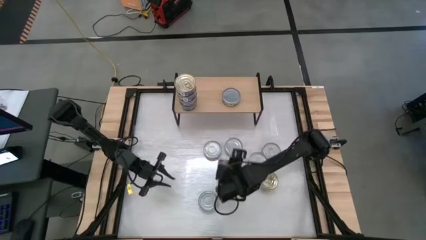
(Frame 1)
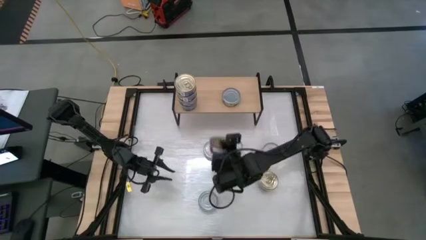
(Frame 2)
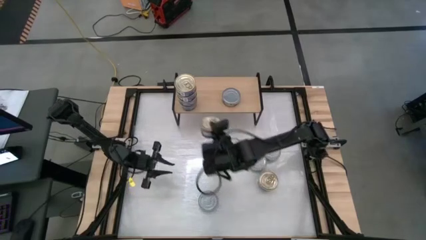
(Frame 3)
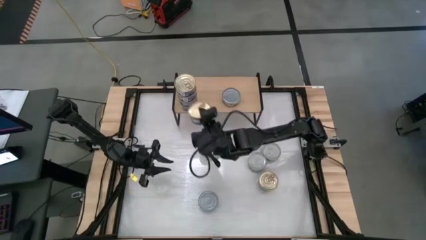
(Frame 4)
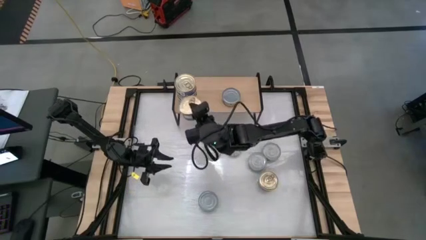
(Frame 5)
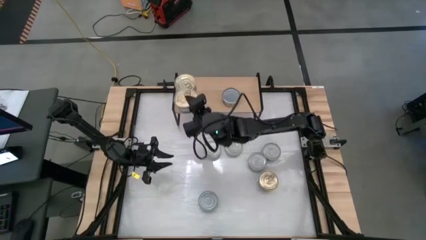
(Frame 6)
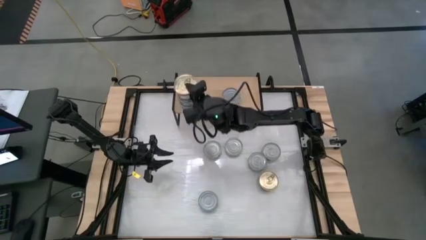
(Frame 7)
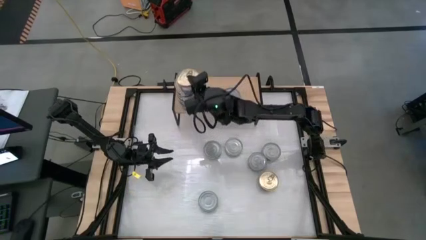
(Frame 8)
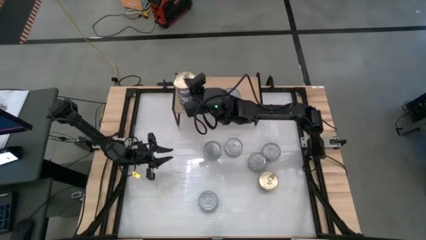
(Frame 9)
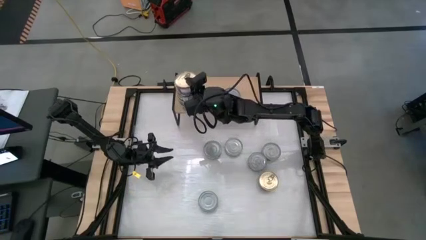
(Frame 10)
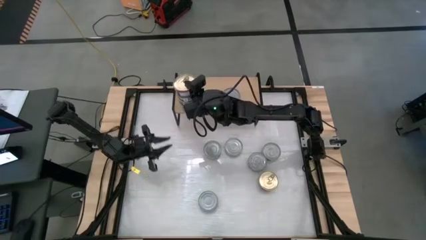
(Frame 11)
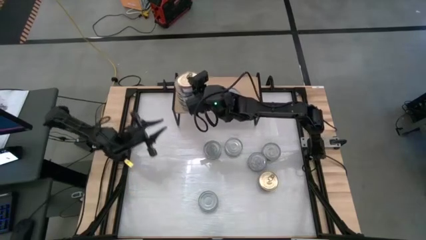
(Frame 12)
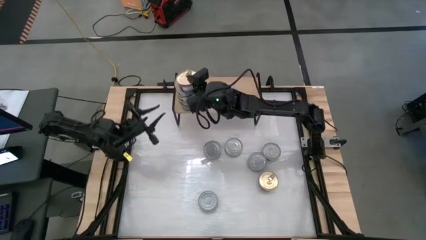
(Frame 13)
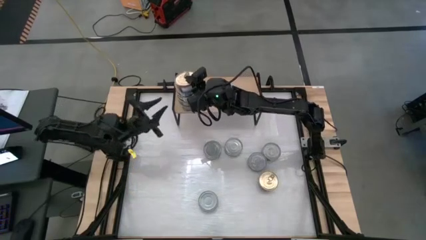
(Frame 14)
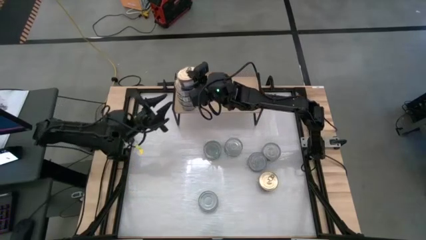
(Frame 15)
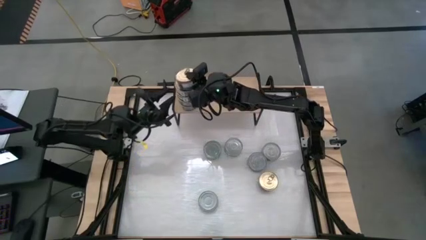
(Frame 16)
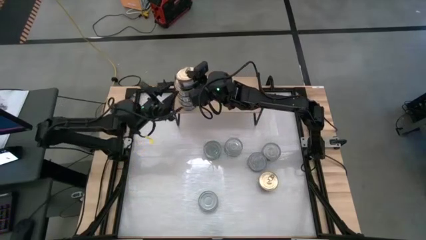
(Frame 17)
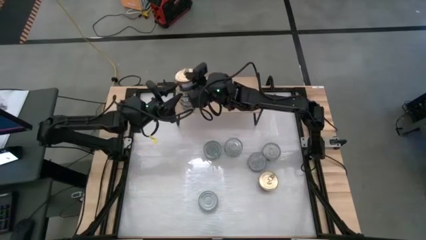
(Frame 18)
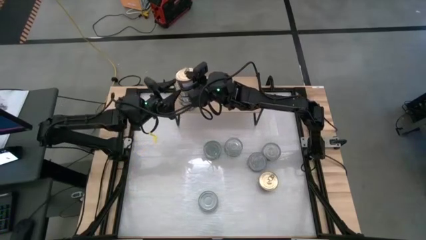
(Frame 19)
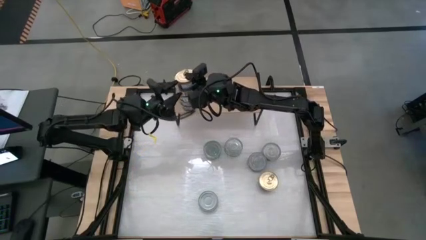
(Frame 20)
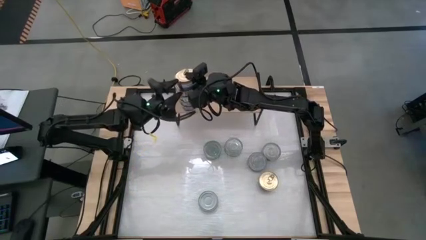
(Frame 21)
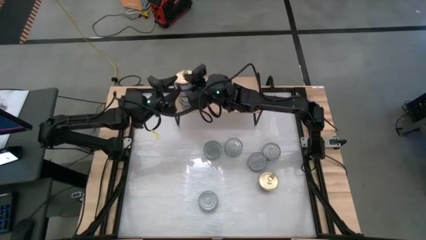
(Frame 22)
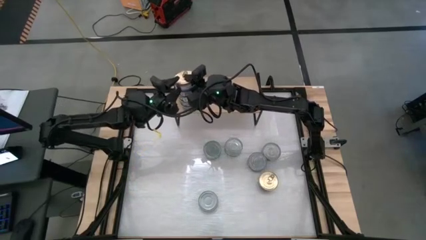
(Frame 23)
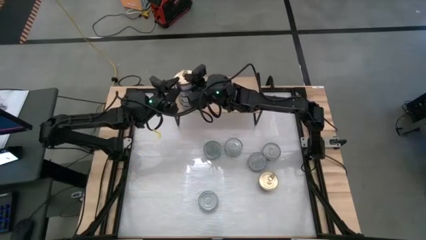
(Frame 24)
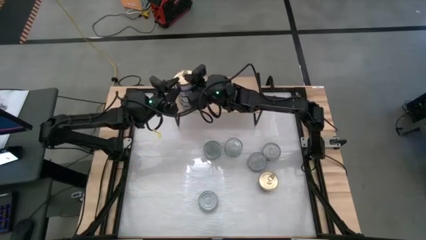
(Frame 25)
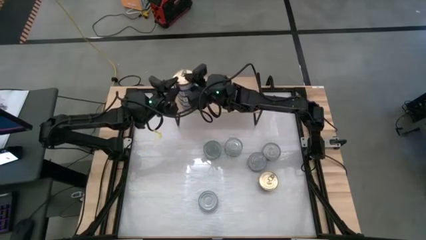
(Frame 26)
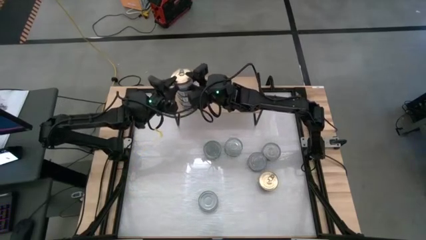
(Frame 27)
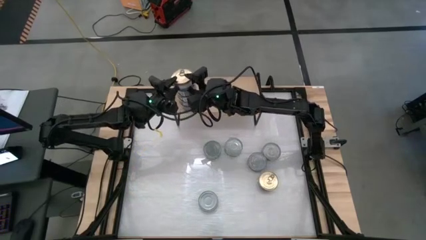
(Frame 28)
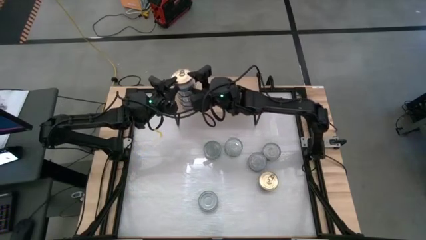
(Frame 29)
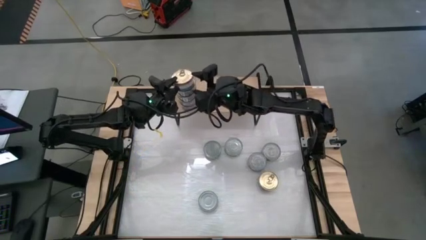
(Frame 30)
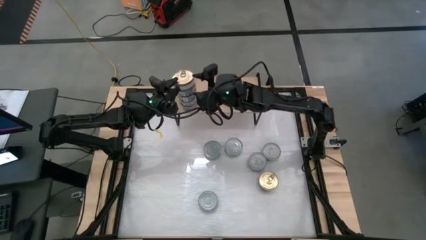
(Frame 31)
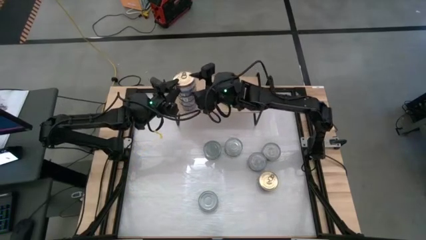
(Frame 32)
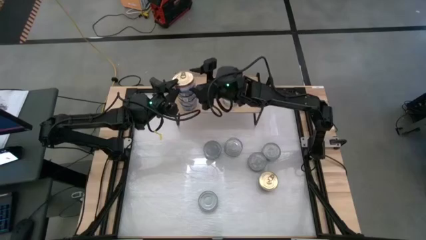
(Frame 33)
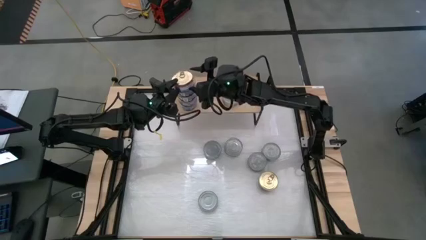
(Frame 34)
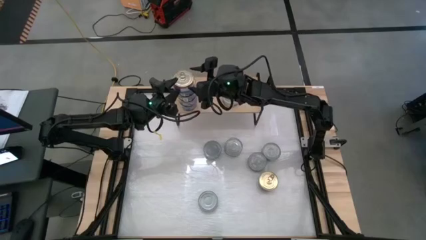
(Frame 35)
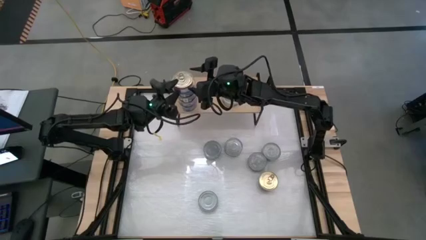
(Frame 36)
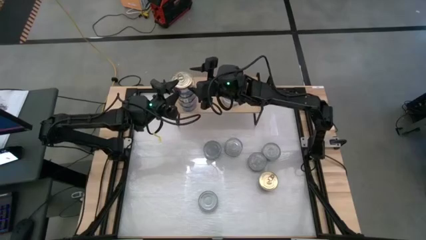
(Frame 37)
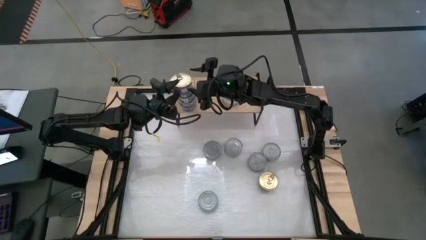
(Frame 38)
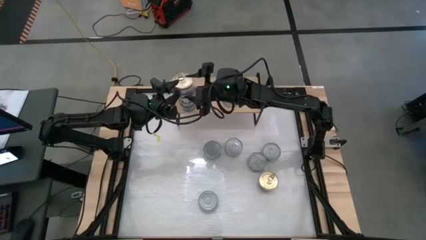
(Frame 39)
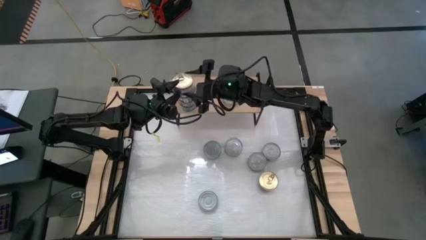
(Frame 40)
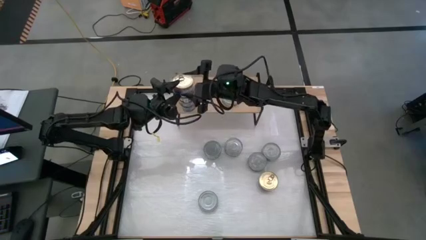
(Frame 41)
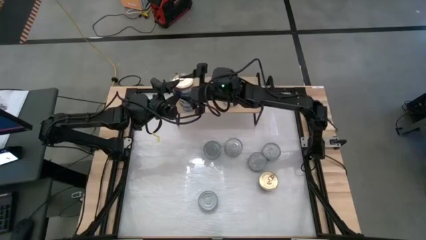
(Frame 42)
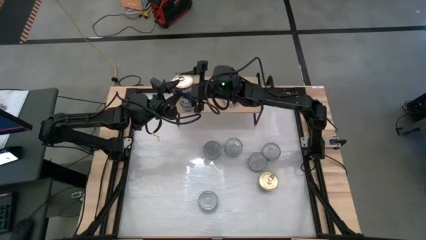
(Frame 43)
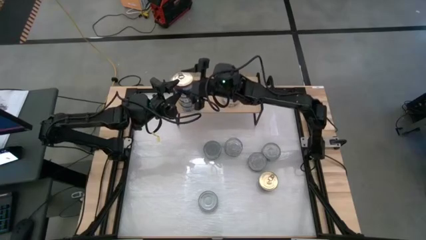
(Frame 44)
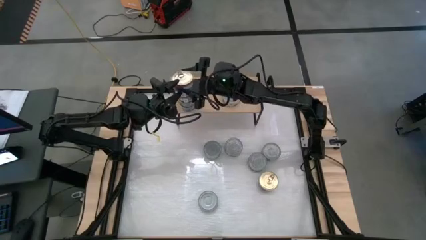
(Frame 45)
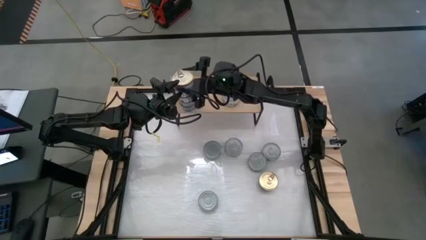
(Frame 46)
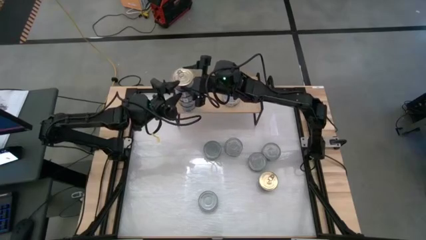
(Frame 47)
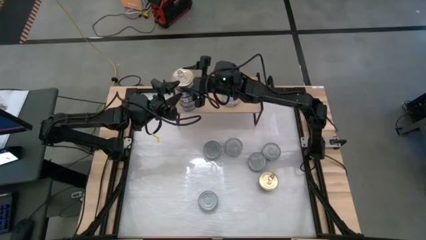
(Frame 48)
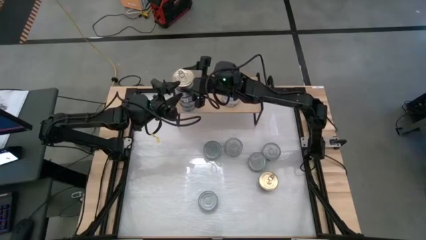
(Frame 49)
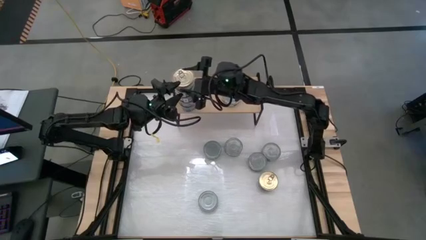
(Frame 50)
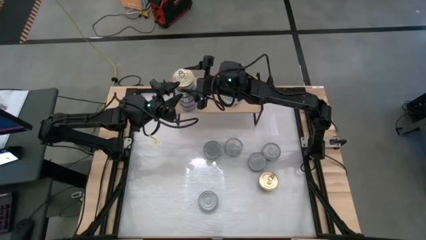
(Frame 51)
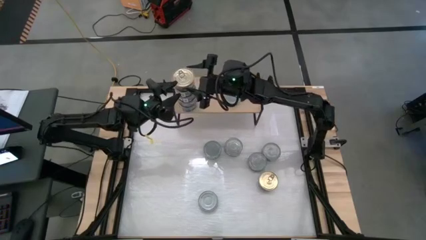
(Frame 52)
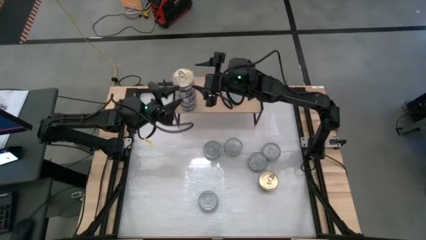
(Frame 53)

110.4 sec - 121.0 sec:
Task: Stack canned seafood by type on shelf
Stack the blue tuna can on top of the other blue tuna can on the shelf

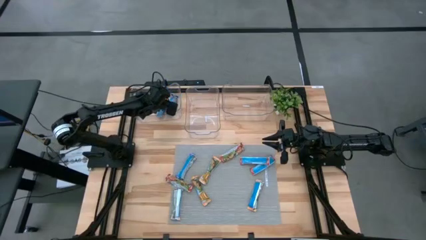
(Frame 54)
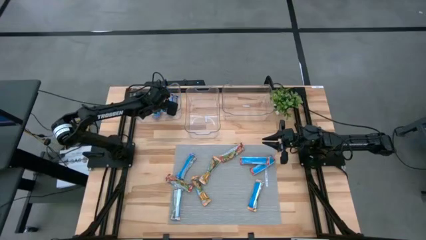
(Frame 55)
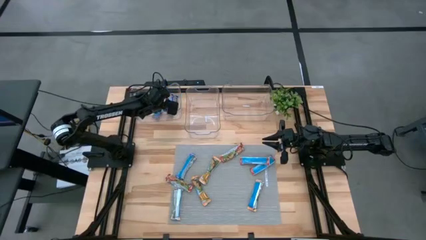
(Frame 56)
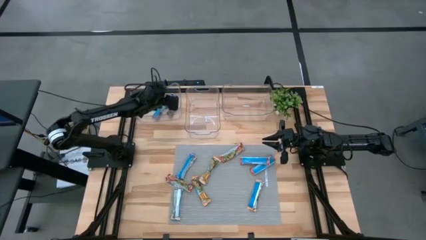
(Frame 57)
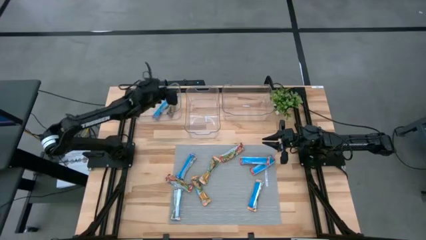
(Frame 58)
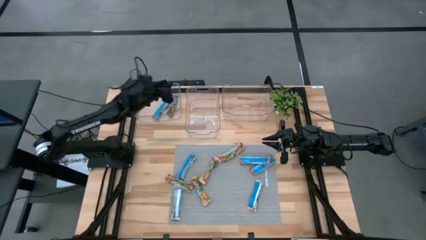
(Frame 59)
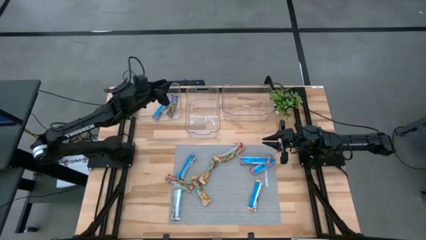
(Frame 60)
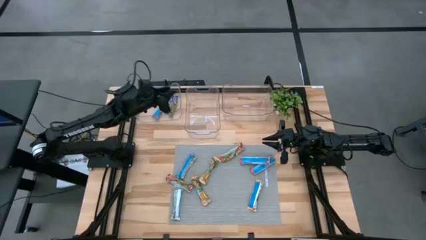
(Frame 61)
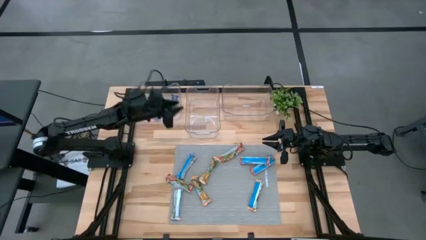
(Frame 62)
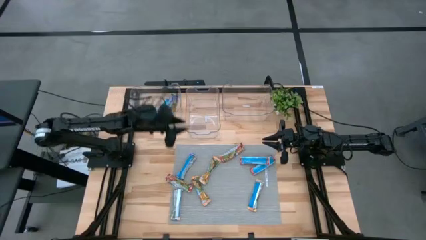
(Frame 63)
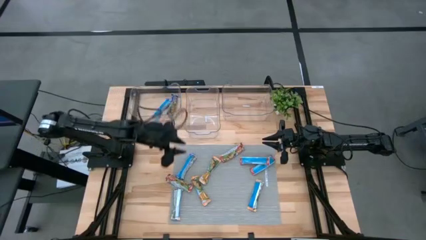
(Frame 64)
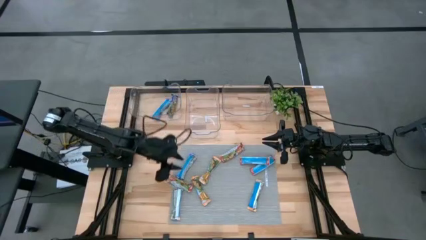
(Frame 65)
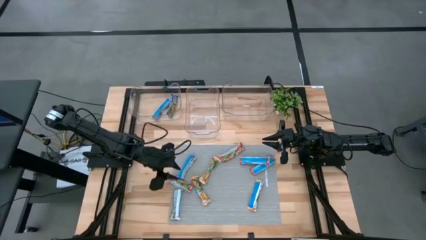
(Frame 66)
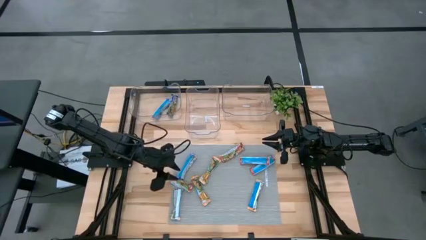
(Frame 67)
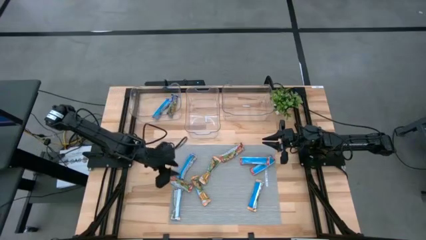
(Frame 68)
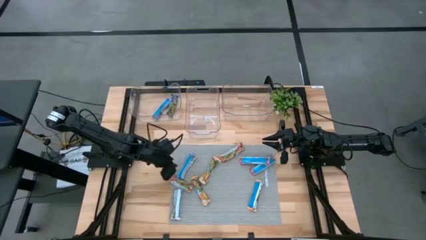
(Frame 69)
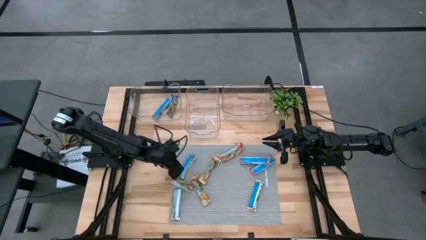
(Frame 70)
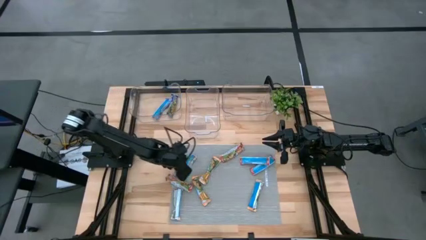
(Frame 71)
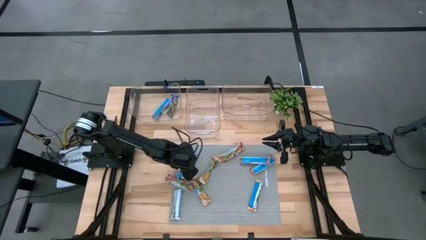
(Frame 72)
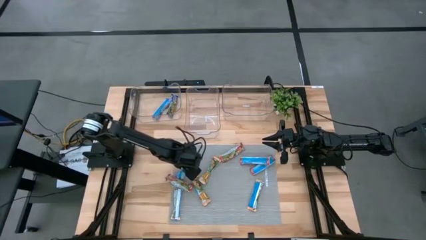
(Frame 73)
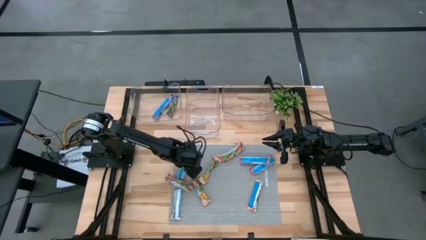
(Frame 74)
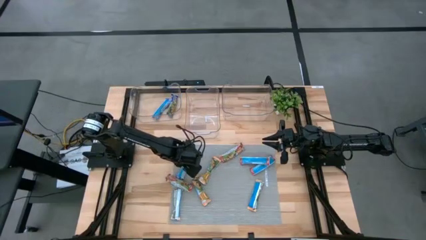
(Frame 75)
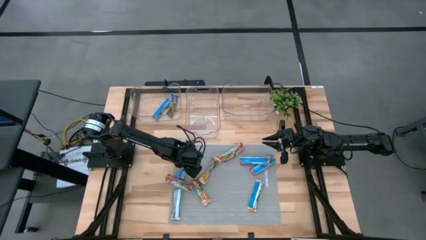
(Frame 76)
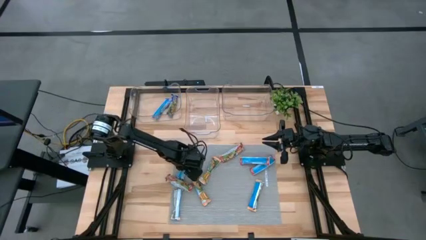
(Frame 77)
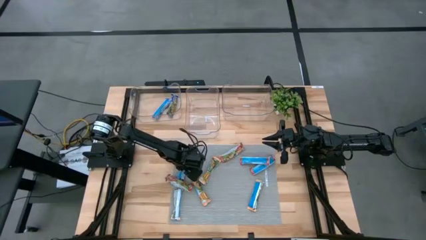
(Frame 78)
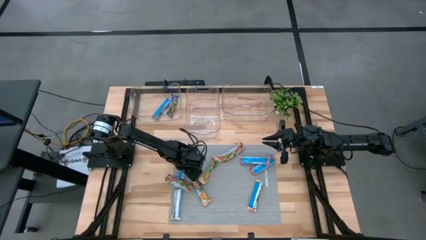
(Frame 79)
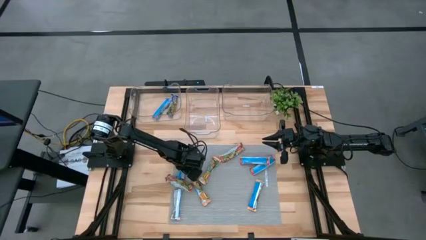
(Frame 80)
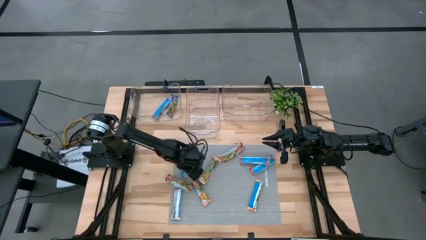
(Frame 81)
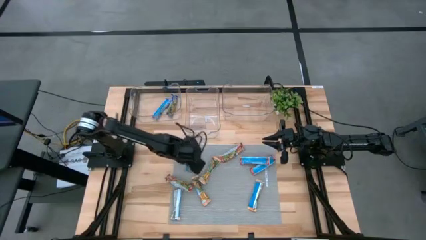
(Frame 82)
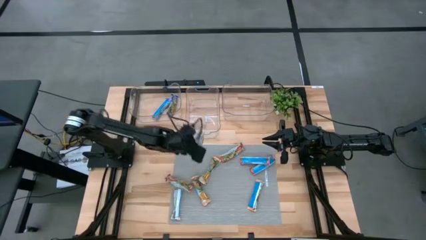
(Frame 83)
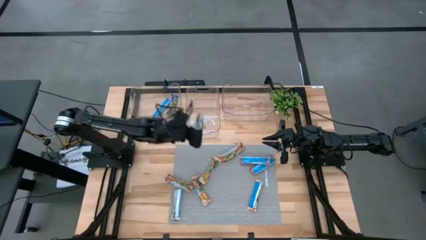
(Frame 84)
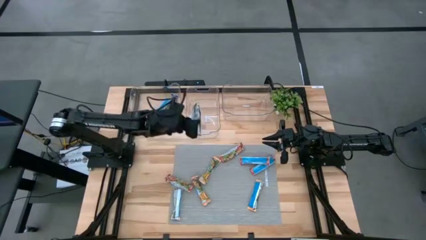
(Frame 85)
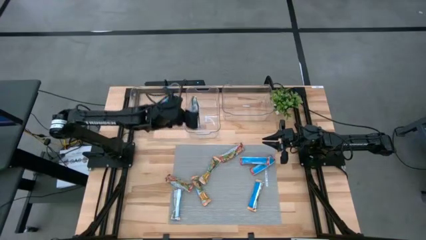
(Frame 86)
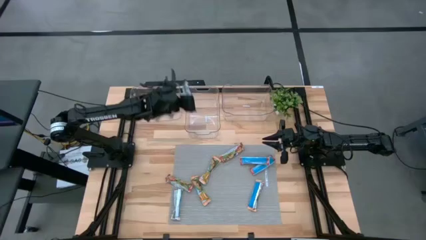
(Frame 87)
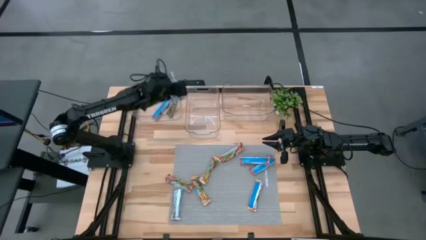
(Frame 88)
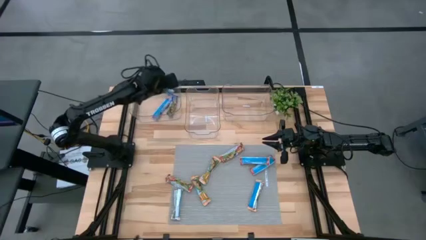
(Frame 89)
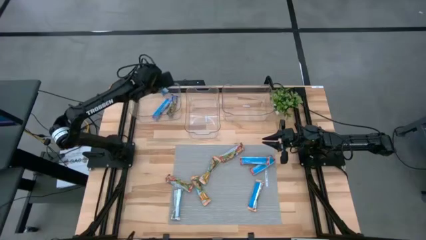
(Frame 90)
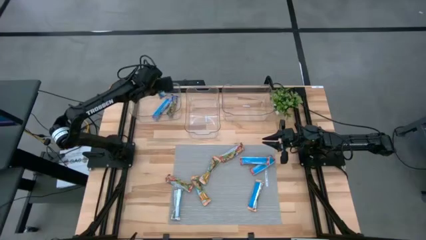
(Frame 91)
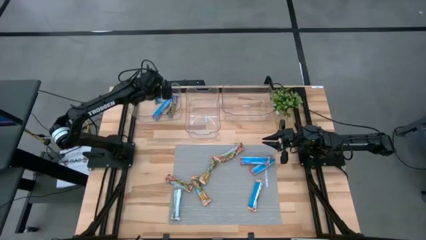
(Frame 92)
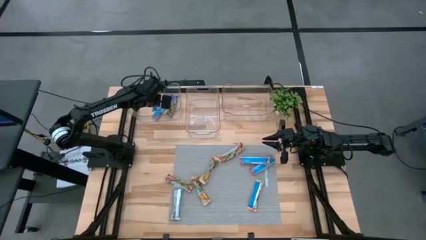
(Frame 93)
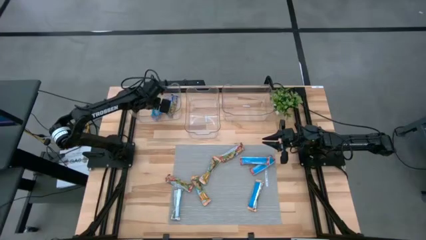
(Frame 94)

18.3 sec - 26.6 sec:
Task: Pick and place Granola Bars by type
Put the blue granola bar into the left transparent bin
